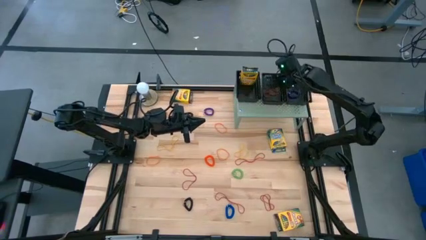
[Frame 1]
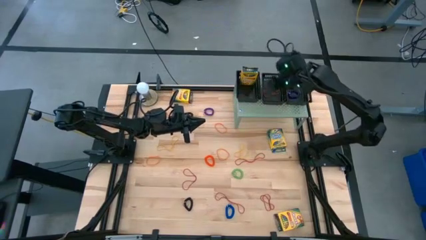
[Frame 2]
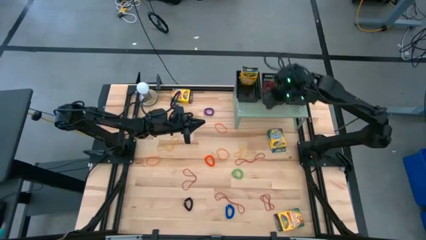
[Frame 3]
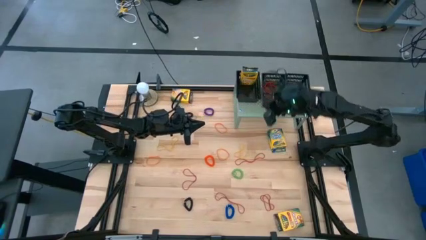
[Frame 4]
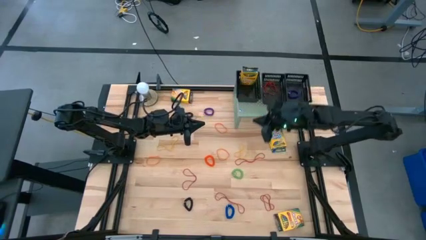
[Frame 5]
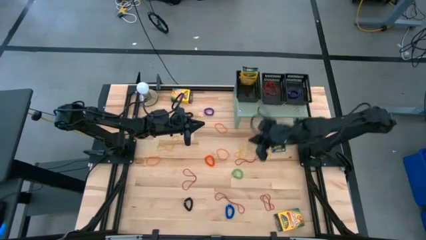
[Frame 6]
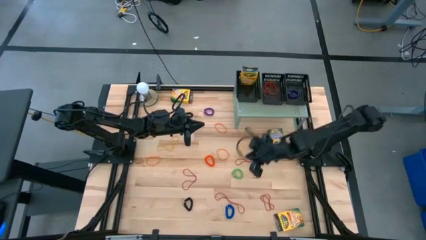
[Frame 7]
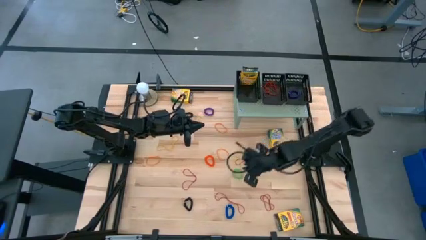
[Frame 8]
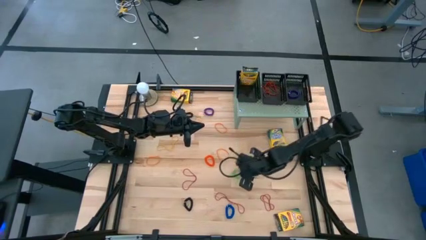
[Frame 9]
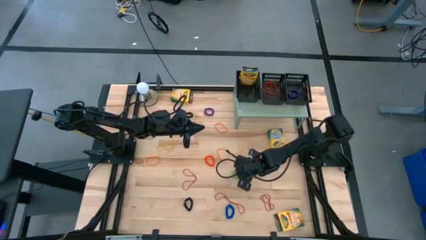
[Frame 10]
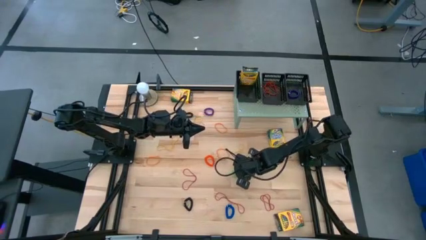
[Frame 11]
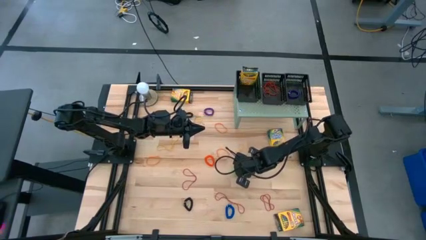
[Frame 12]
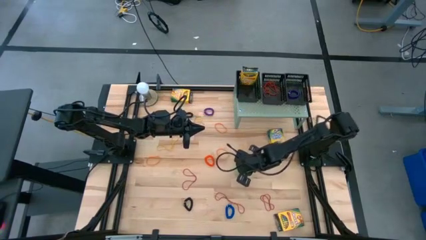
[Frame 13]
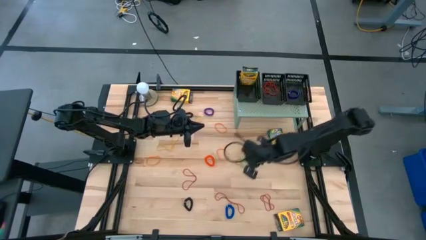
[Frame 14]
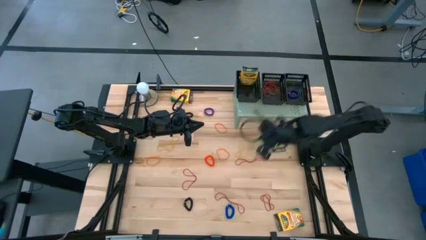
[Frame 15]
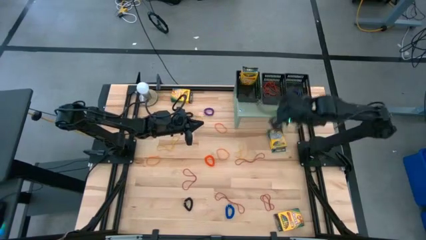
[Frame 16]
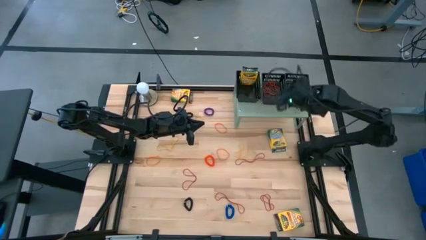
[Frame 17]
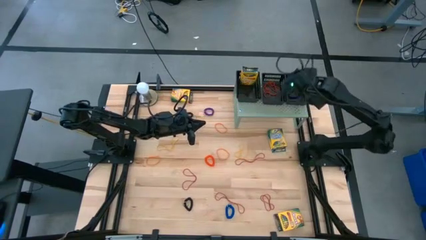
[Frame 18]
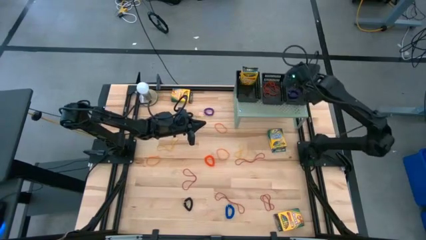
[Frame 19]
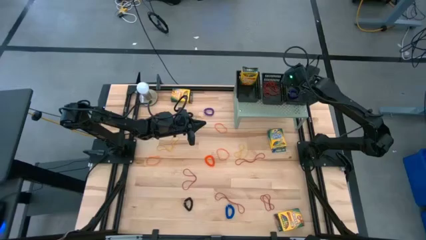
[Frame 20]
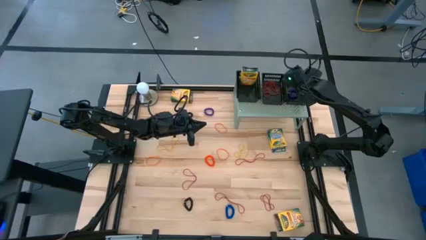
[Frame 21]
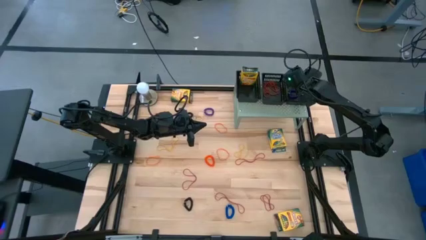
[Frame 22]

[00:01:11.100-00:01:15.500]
Task: Pick & Place Office Desk Supplies
Put the bottom green spring keychain into the right black basket on the shelf

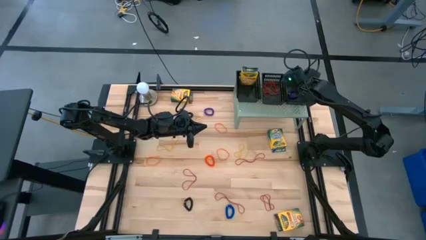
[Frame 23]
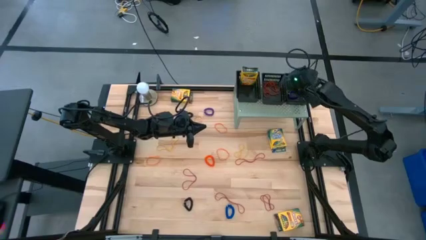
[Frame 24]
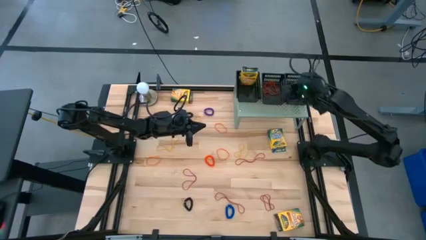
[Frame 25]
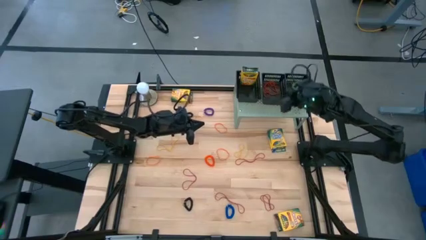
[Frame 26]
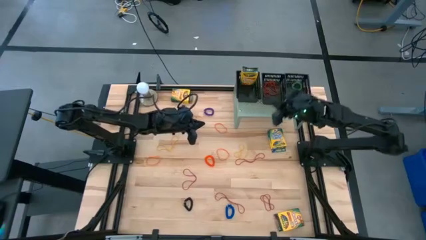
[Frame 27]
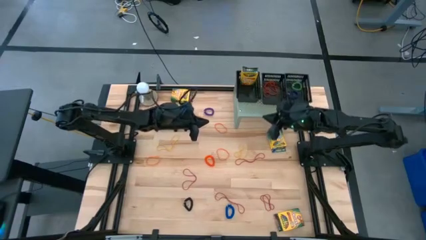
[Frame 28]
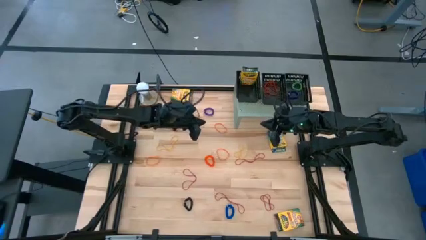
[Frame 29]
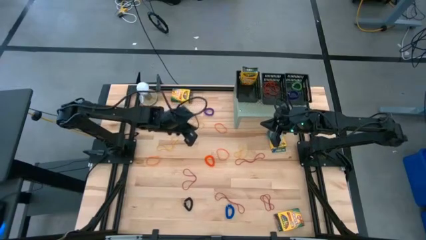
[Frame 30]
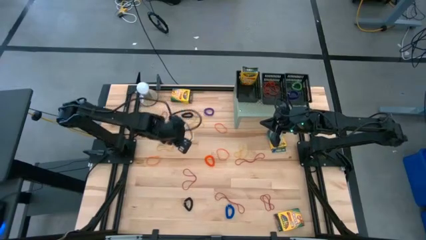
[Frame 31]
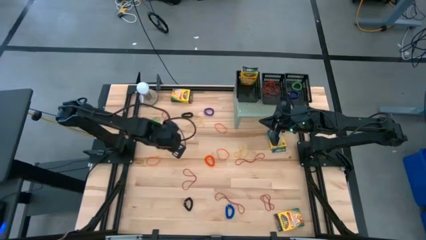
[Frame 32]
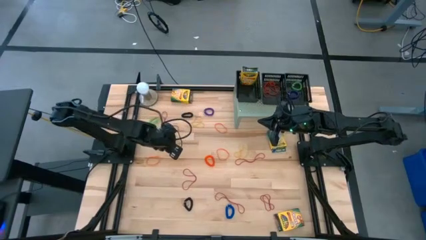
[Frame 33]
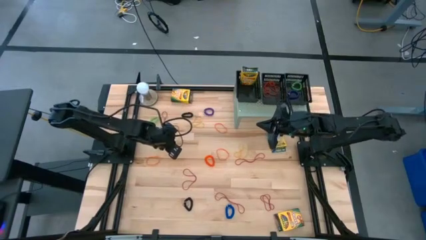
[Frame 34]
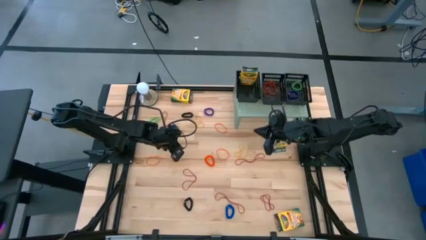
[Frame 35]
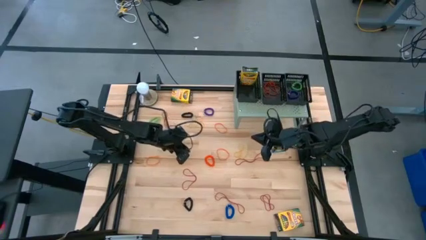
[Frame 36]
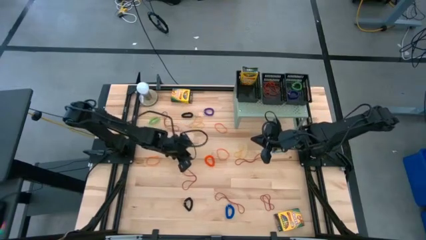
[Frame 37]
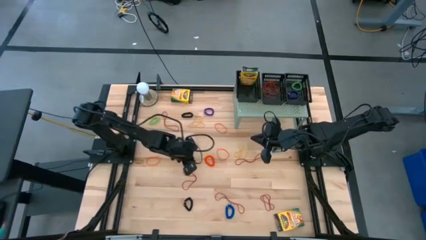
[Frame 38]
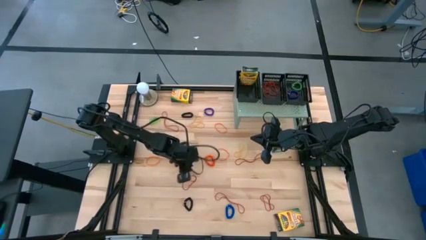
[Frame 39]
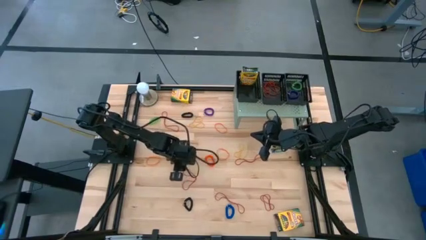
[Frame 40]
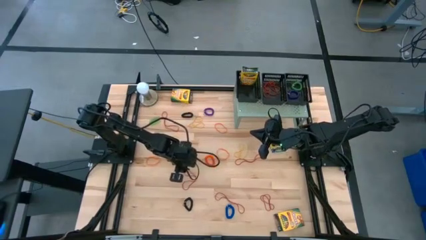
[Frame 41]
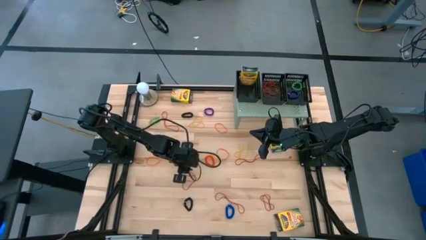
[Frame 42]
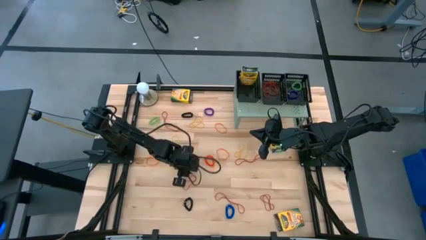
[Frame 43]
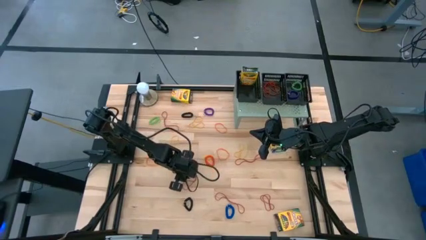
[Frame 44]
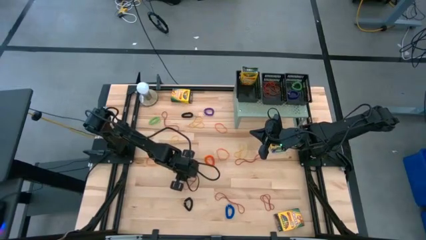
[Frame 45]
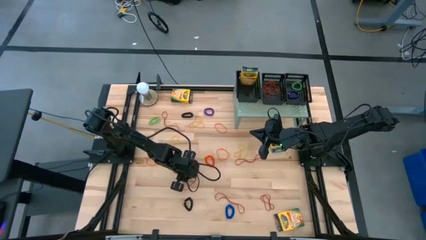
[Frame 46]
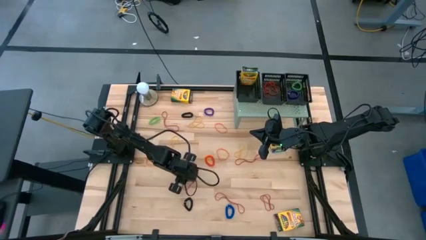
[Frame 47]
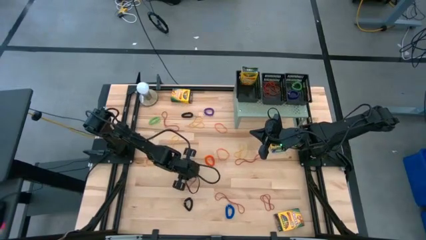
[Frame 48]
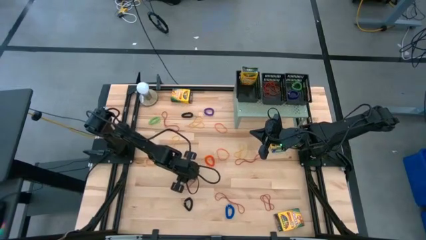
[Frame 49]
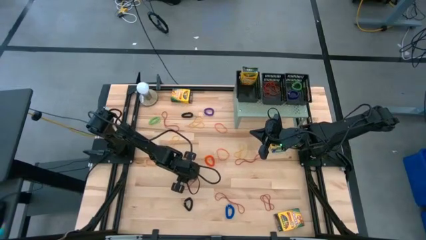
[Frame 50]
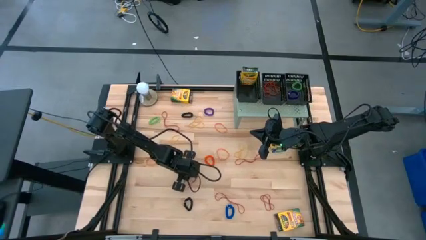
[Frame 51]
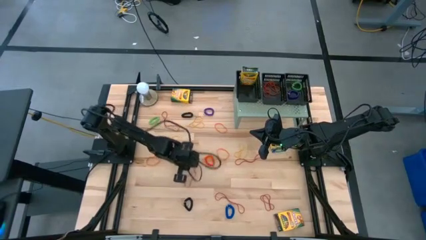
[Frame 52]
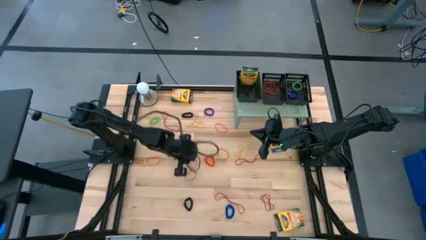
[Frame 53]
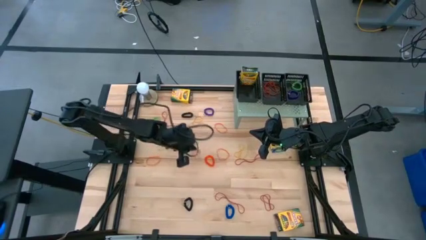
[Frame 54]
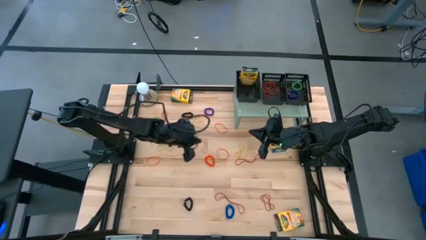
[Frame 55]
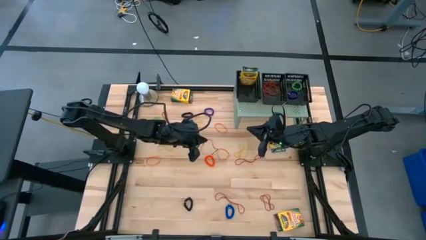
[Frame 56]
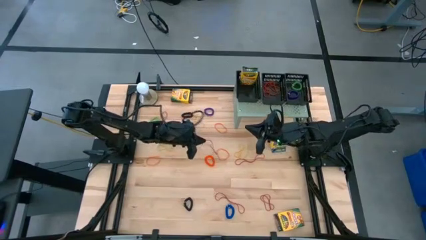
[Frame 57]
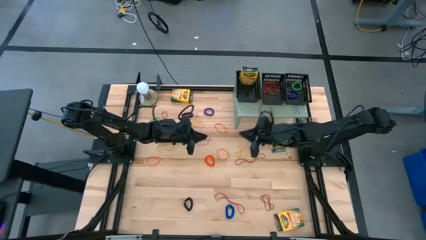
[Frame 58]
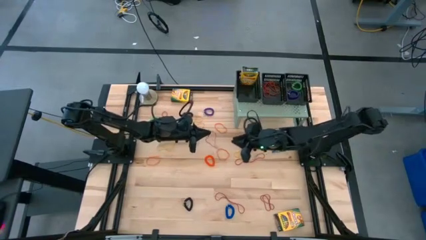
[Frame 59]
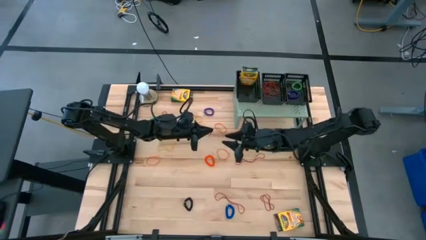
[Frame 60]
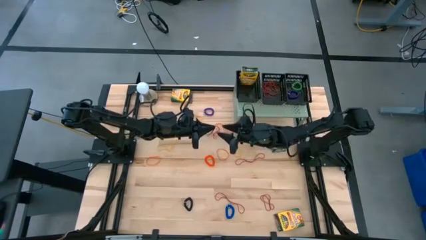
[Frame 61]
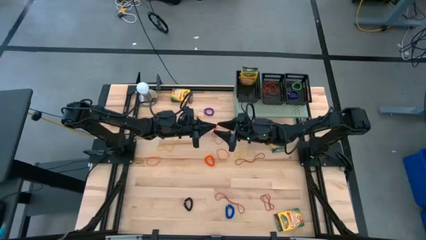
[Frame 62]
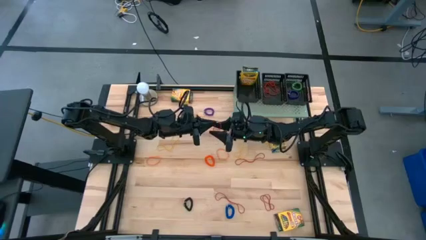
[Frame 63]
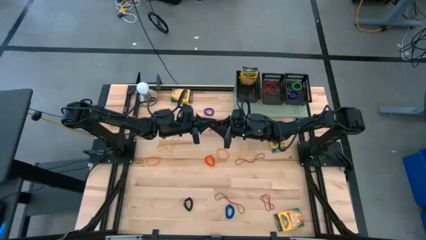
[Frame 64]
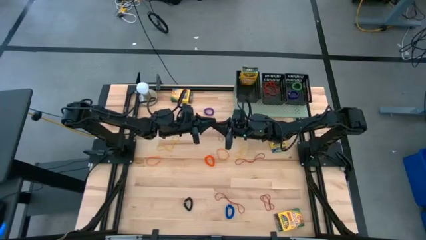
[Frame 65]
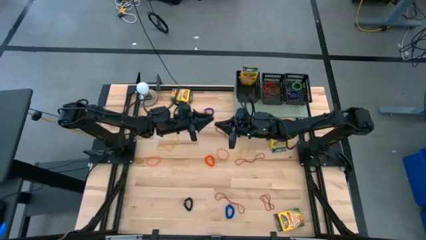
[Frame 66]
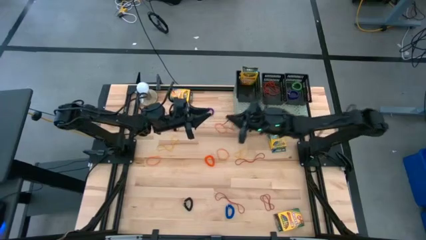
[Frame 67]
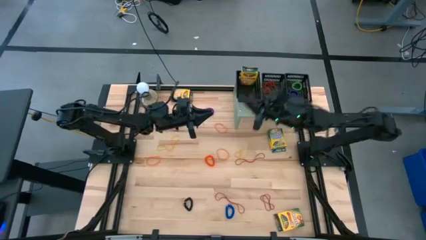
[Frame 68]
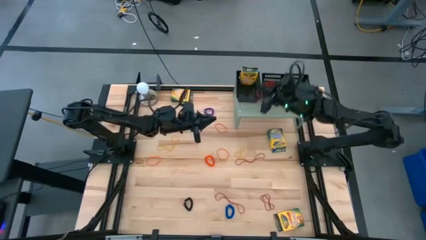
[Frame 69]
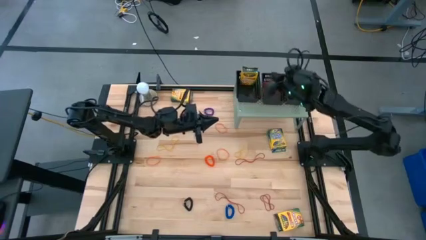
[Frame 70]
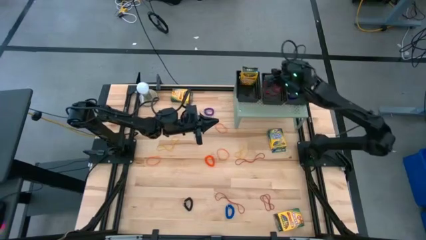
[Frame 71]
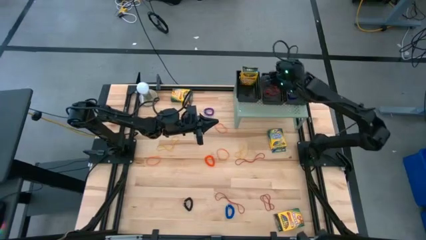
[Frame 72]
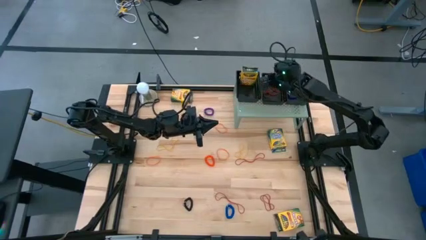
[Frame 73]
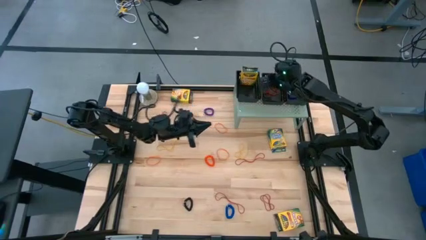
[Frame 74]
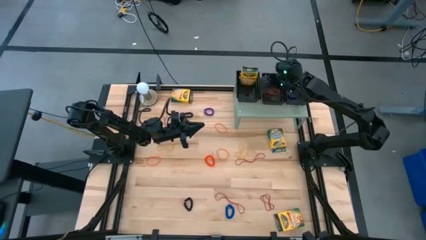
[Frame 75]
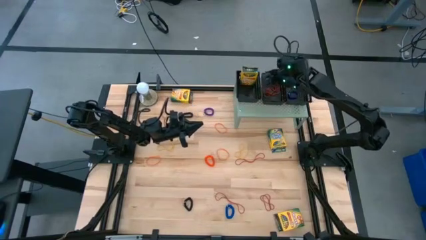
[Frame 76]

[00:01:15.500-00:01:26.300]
Put the red rubber band into the middle black basket on the shelf
